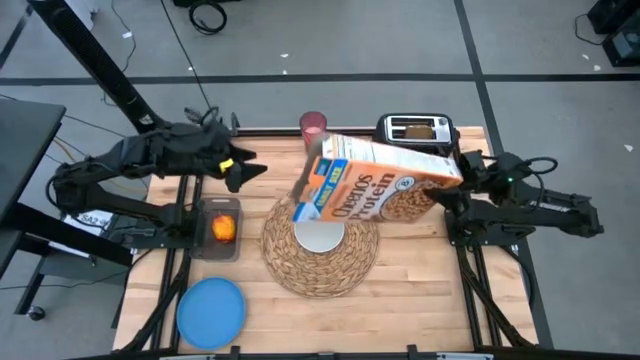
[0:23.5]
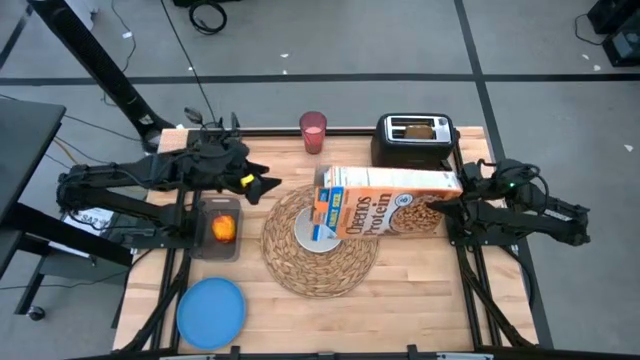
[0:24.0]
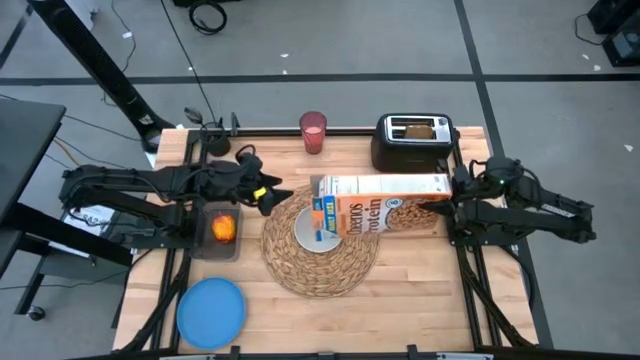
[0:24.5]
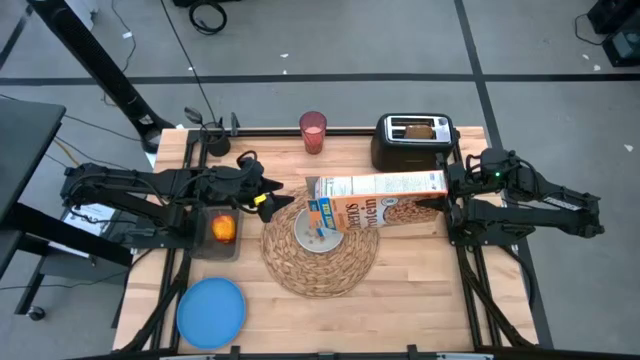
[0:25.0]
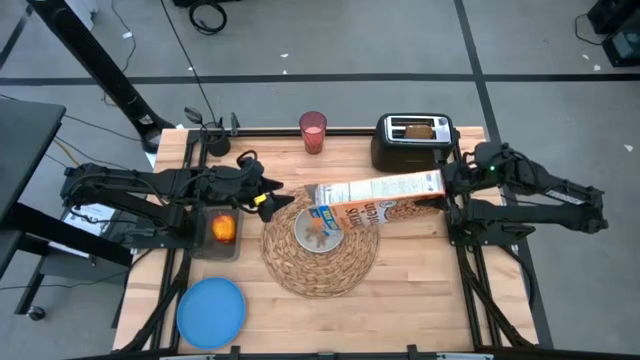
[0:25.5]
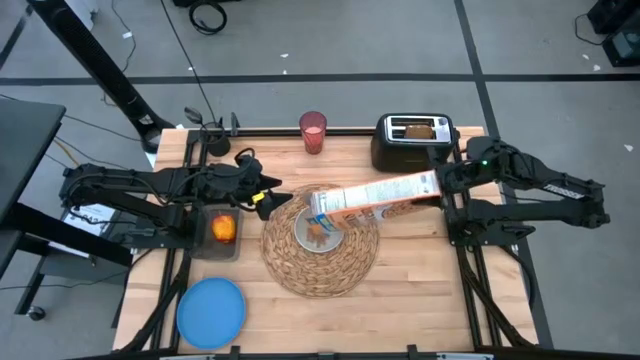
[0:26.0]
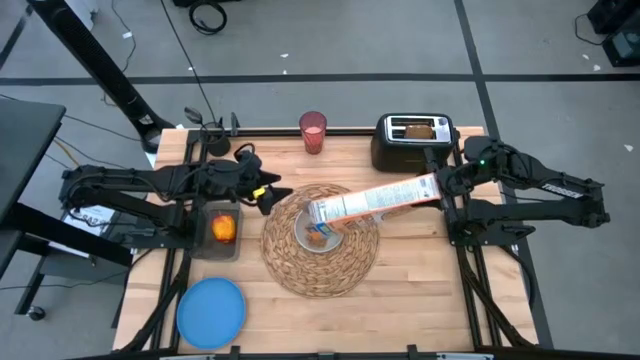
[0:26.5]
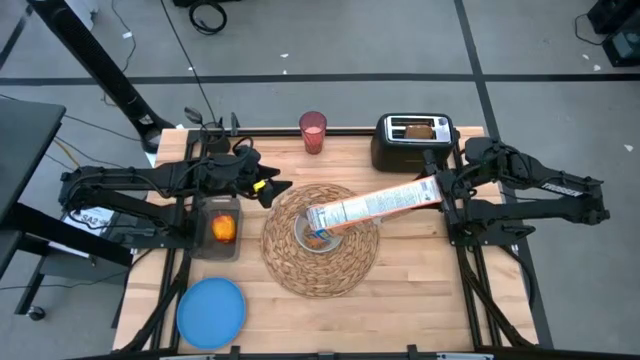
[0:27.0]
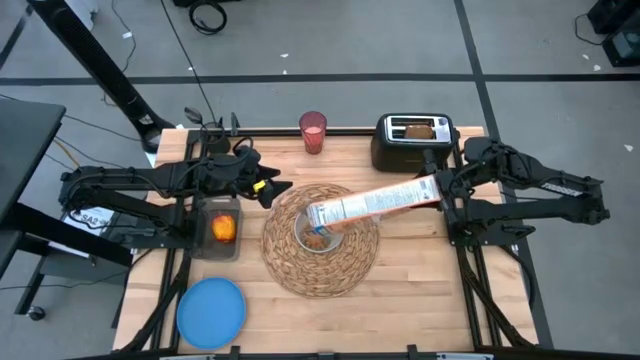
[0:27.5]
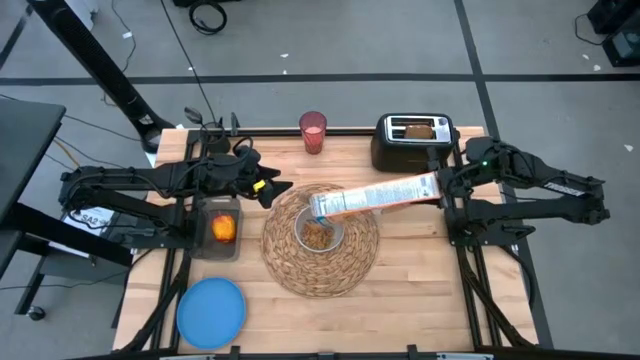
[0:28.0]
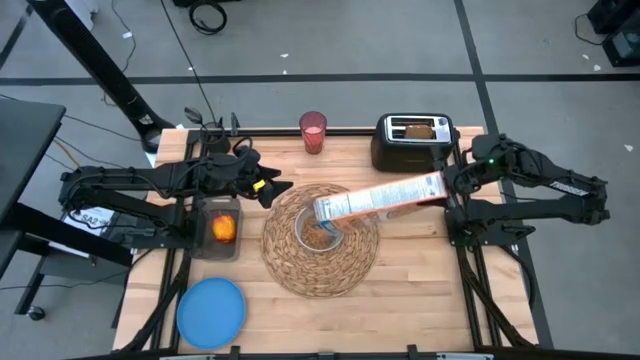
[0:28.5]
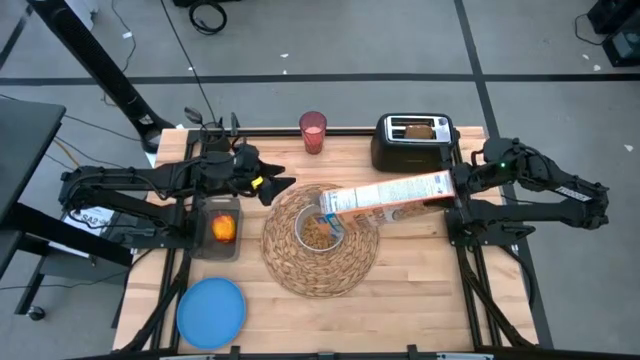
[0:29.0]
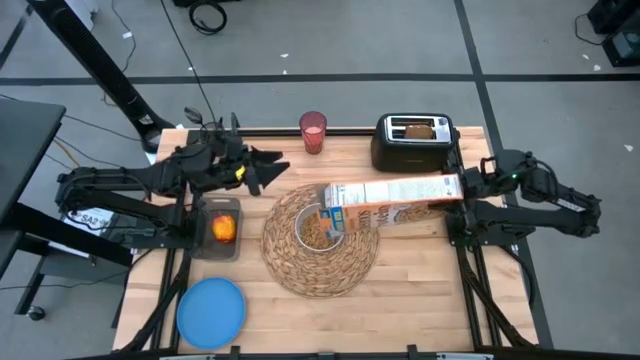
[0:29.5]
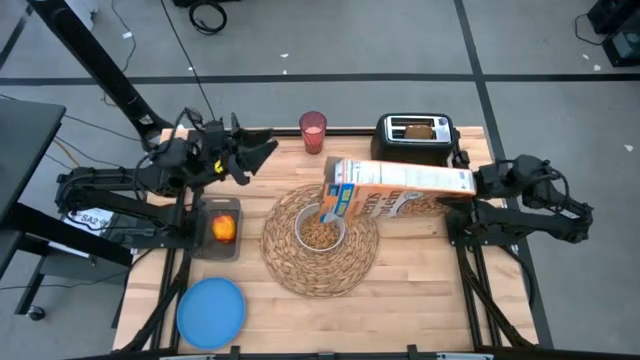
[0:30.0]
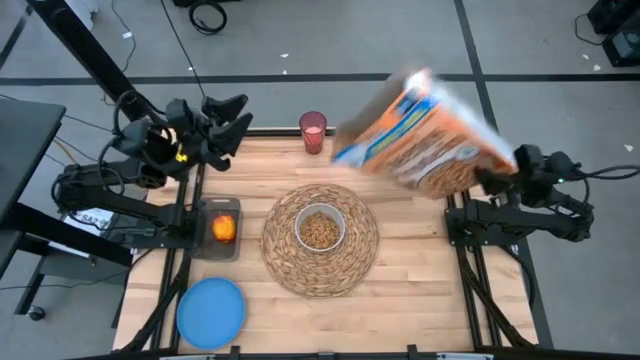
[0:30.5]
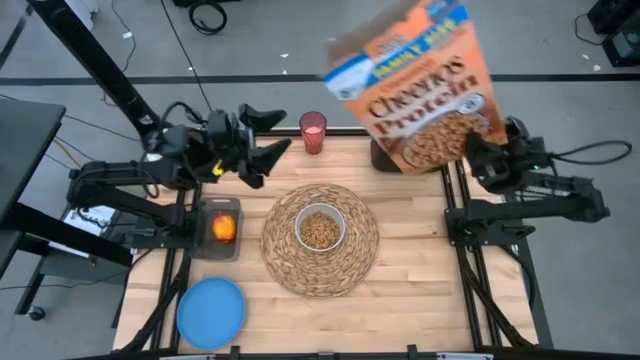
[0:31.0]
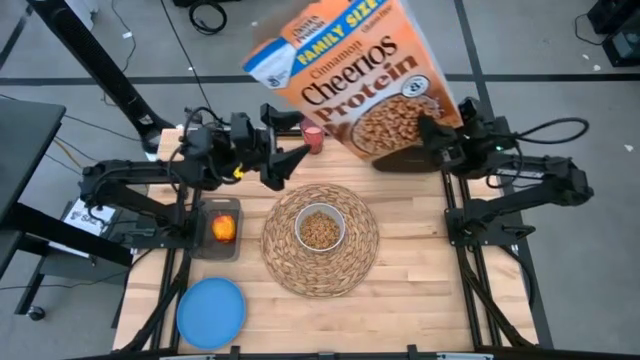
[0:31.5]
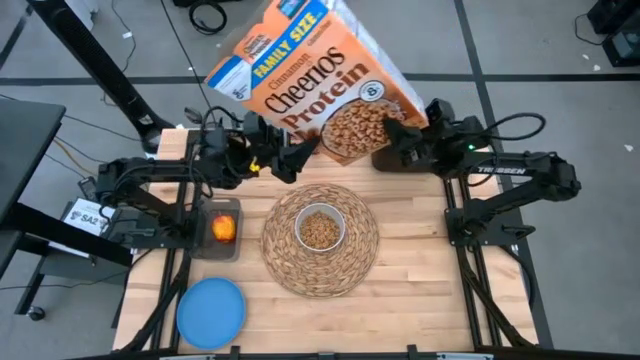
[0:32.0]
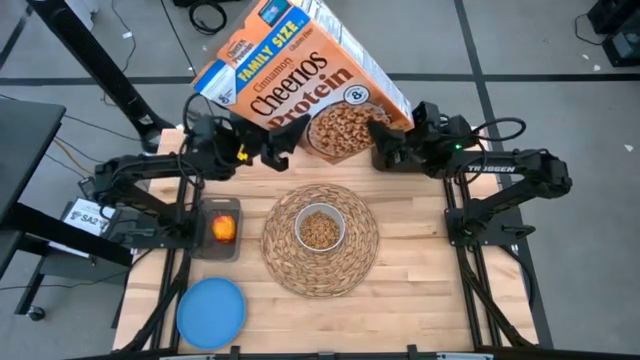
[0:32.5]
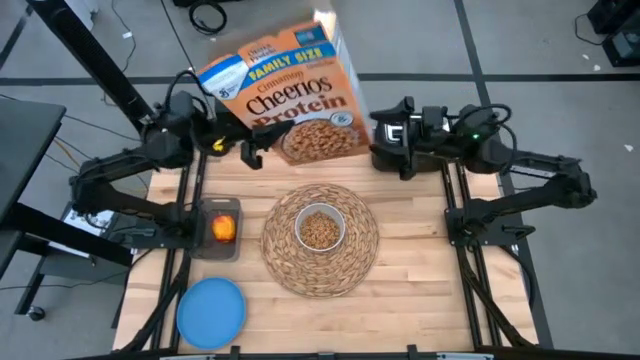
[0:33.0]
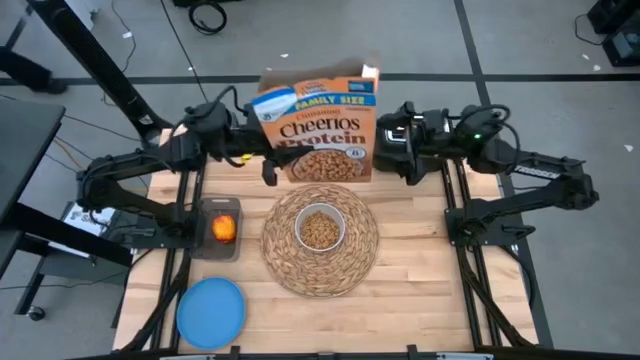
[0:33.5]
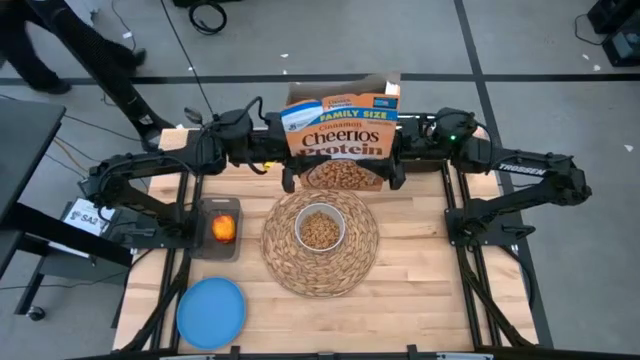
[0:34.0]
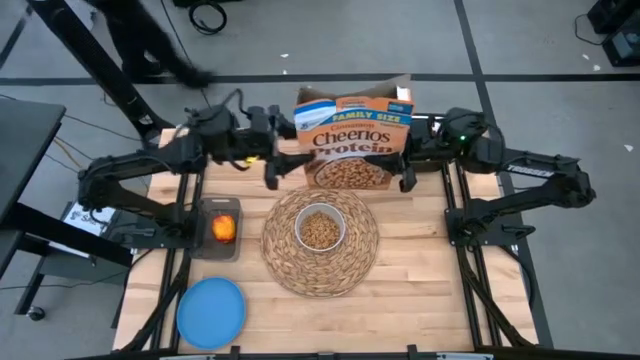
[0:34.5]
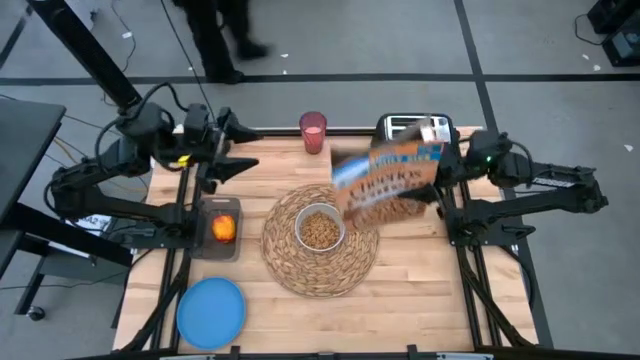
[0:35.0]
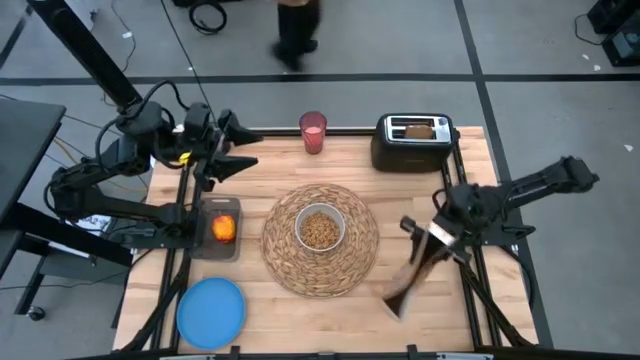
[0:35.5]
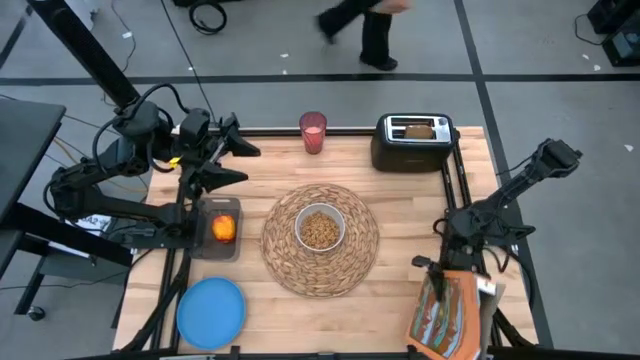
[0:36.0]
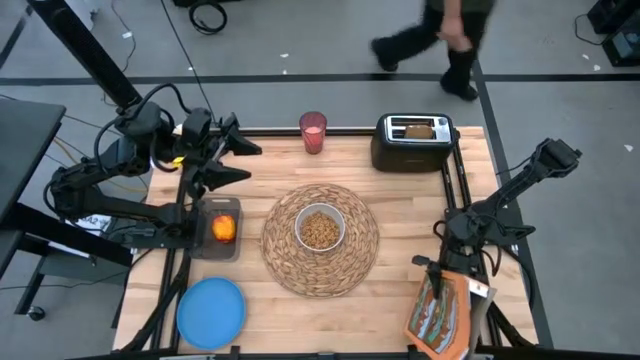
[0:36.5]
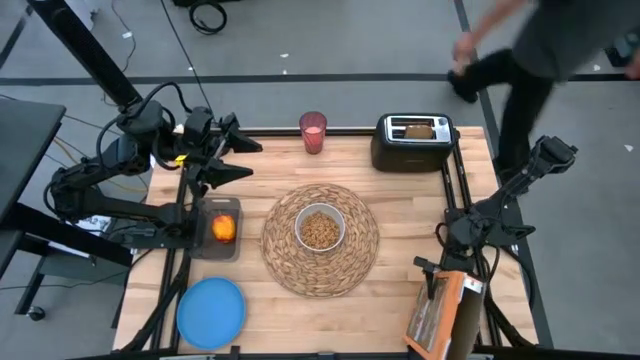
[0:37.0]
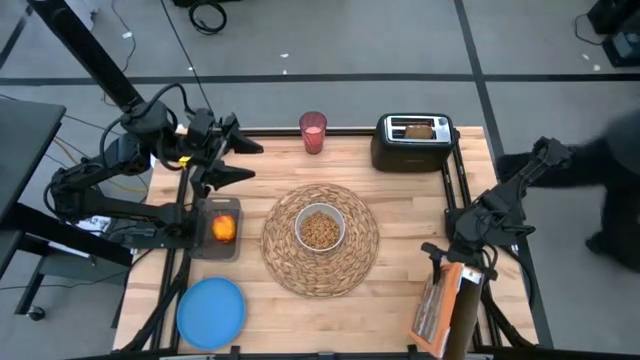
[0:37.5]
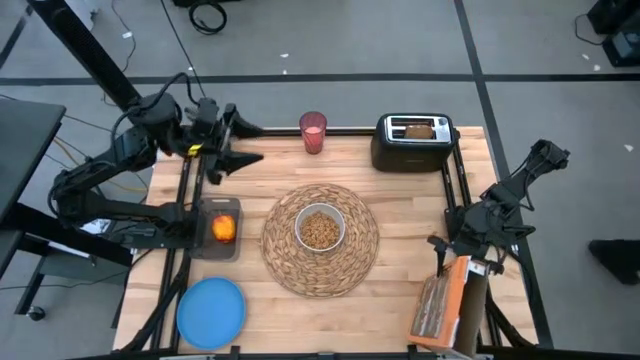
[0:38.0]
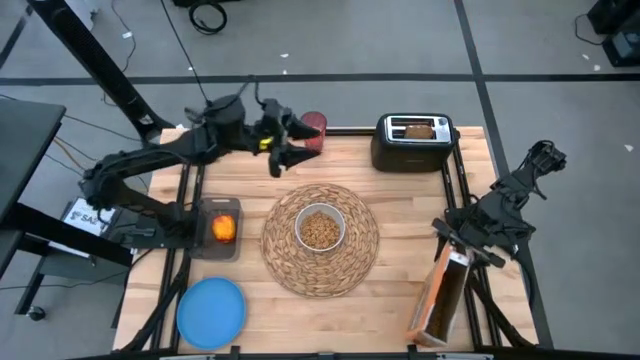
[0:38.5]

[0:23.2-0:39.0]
Task: Arrange a breakfast setting
Pour the cereal into the white bowl

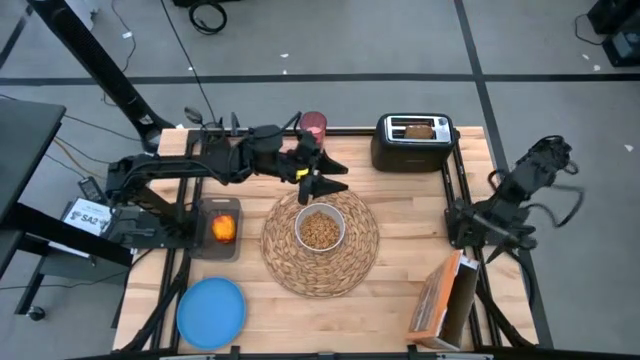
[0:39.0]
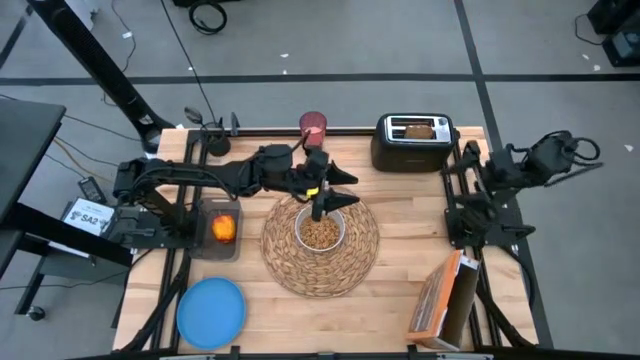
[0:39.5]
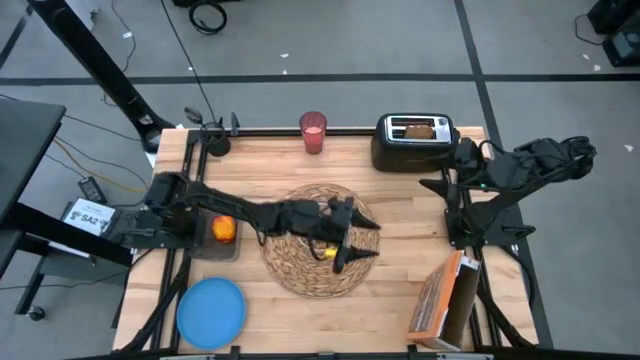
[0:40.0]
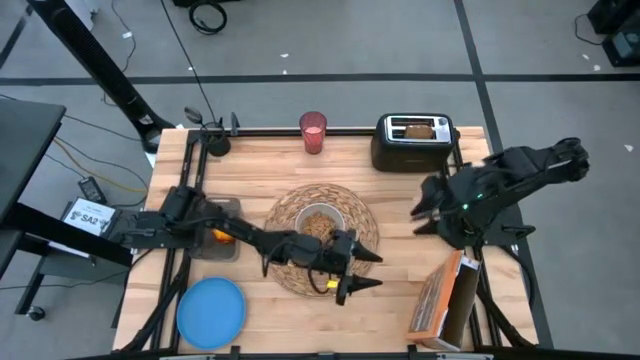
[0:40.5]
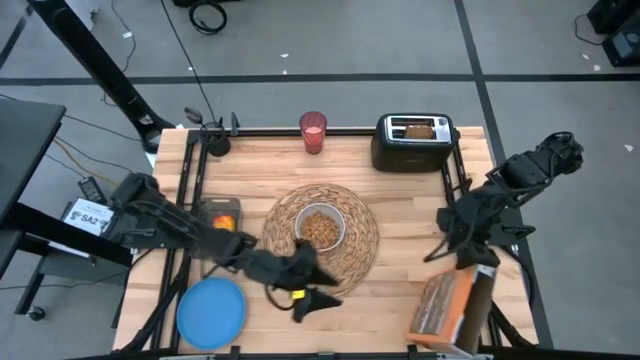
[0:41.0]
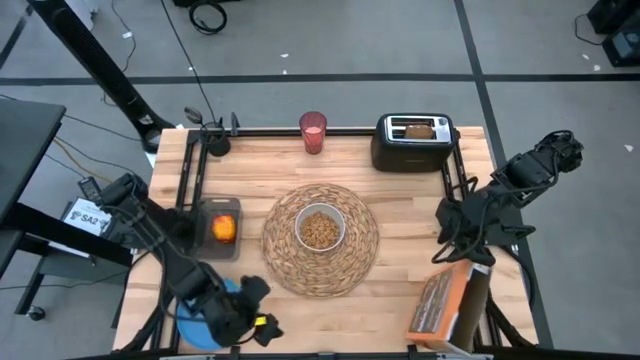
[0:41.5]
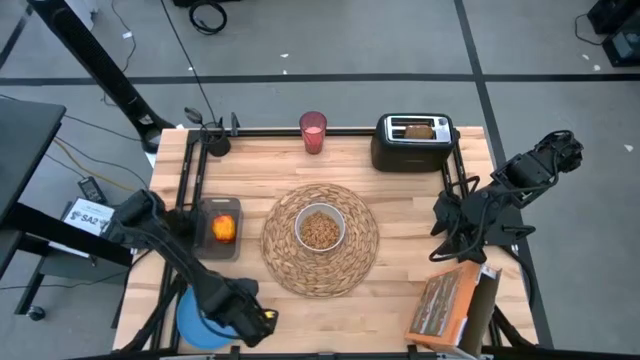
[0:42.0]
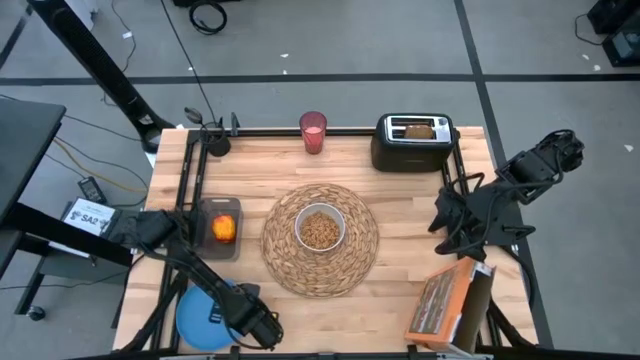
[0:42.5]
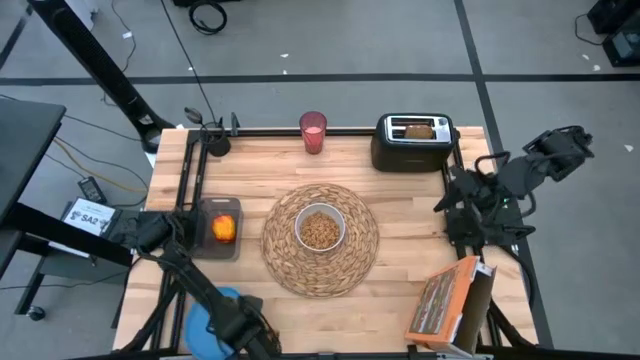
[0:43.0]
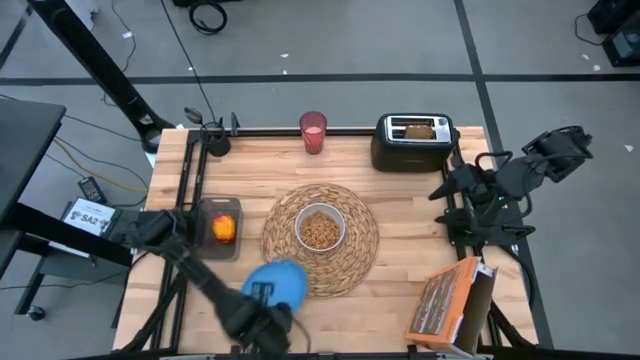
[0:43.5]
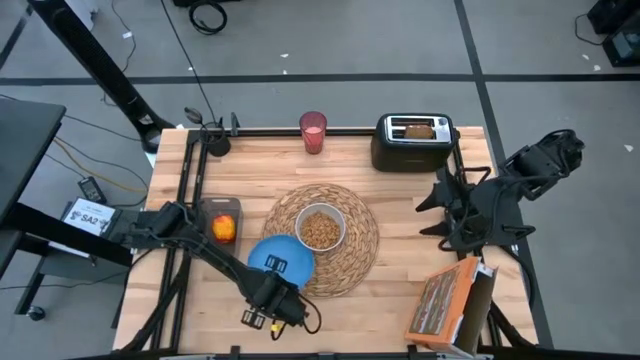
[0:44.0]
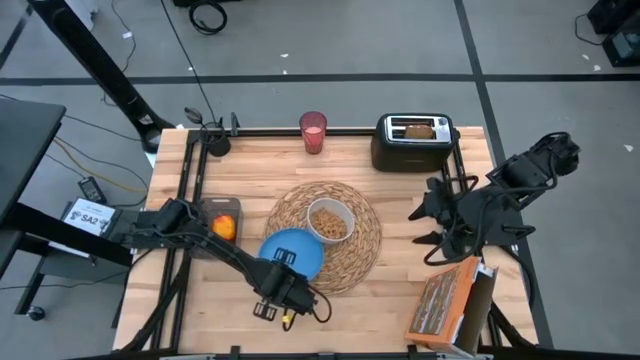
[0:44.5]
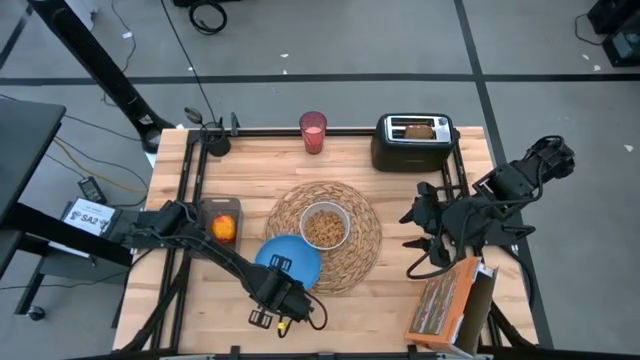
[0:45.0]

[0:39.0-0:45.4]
Put the blue plate on the brown table mat
